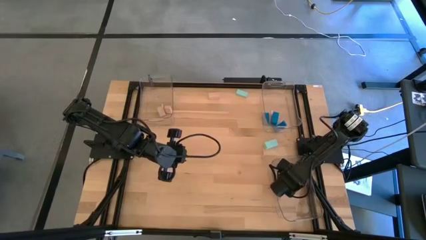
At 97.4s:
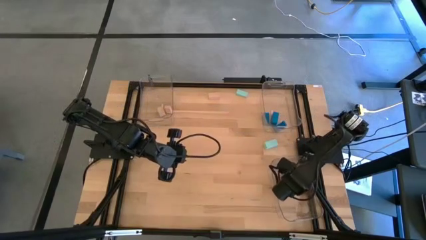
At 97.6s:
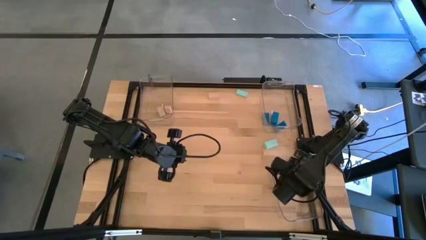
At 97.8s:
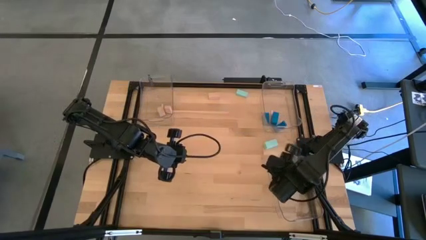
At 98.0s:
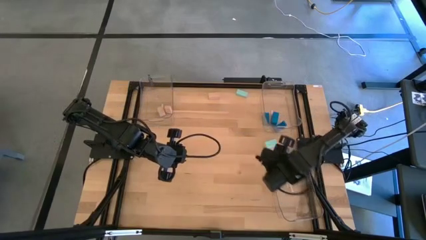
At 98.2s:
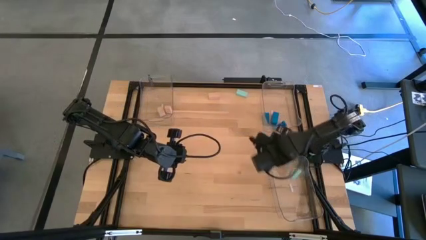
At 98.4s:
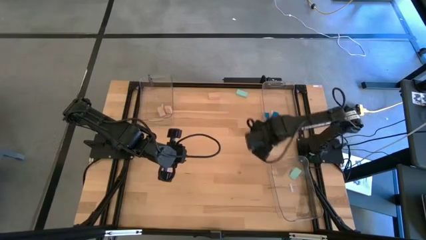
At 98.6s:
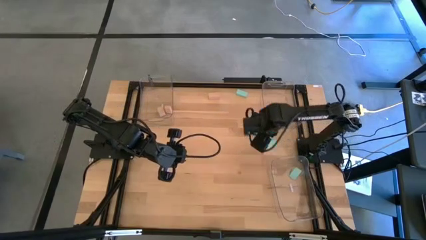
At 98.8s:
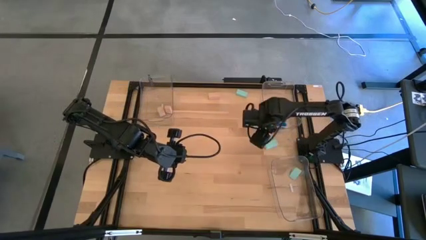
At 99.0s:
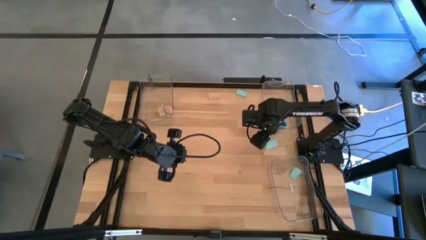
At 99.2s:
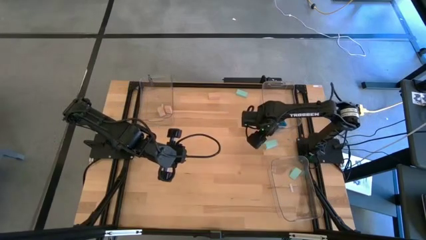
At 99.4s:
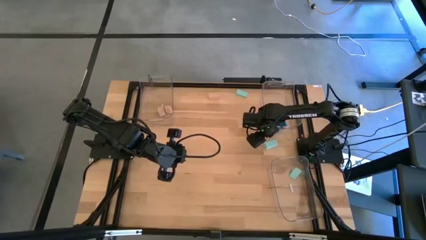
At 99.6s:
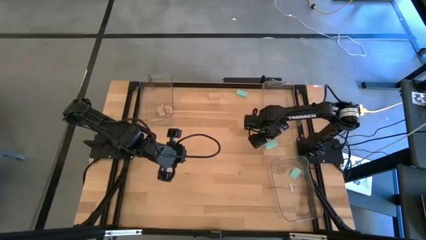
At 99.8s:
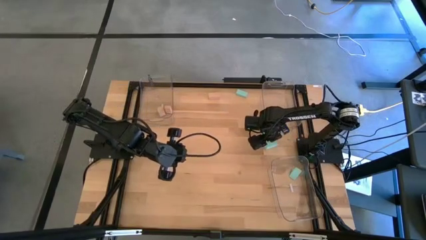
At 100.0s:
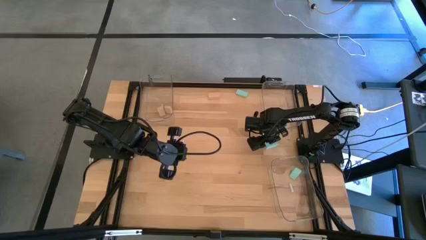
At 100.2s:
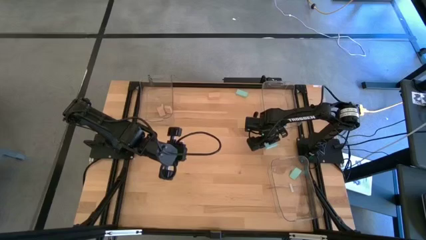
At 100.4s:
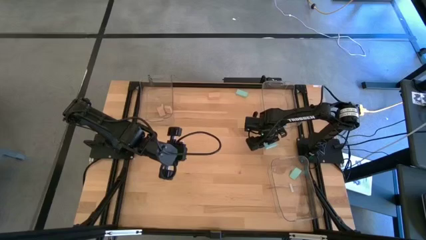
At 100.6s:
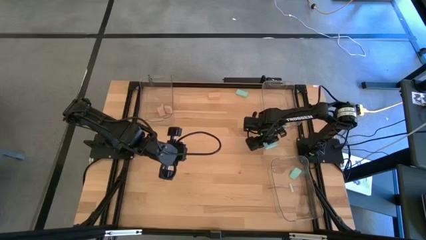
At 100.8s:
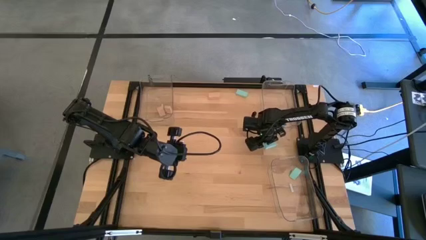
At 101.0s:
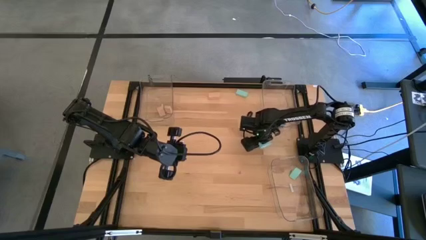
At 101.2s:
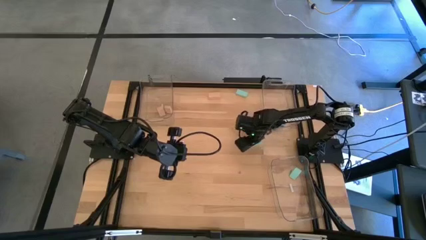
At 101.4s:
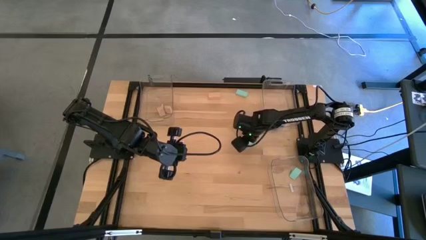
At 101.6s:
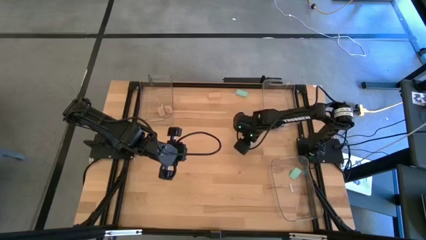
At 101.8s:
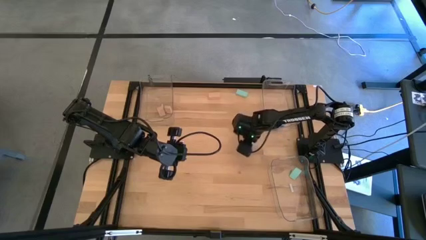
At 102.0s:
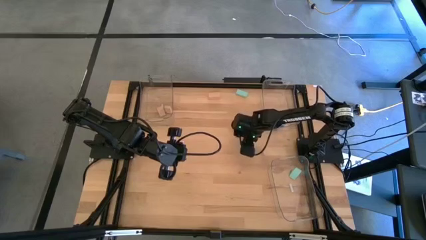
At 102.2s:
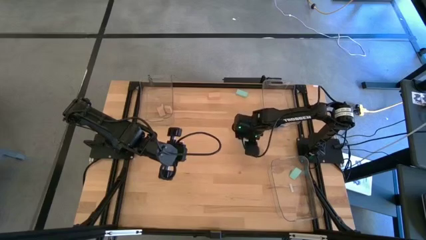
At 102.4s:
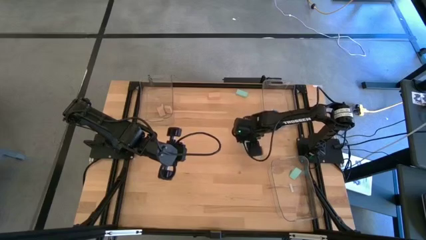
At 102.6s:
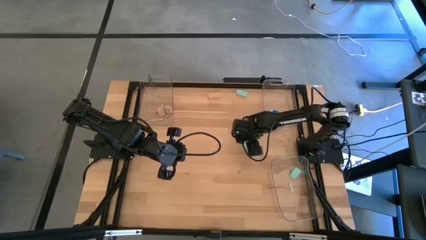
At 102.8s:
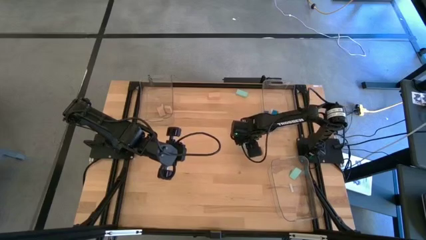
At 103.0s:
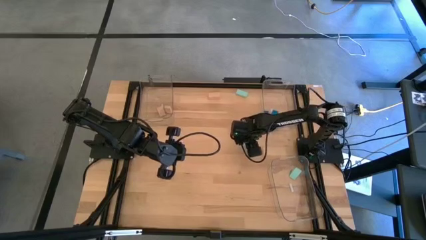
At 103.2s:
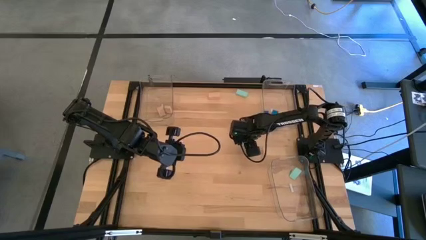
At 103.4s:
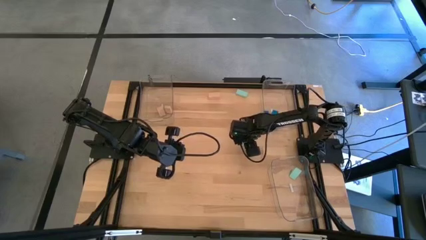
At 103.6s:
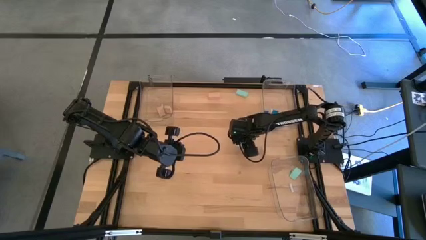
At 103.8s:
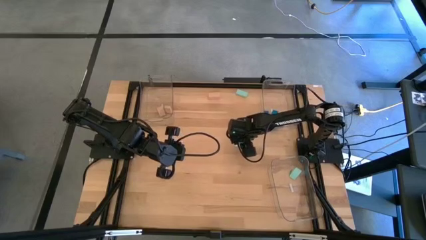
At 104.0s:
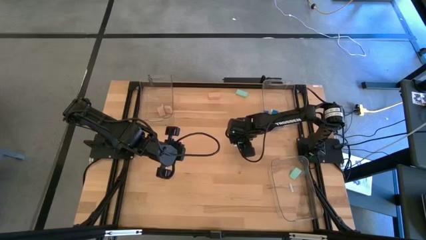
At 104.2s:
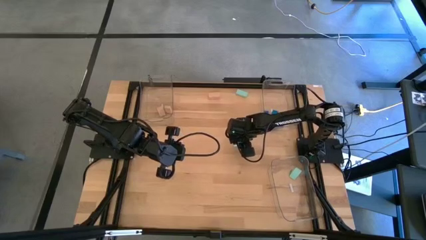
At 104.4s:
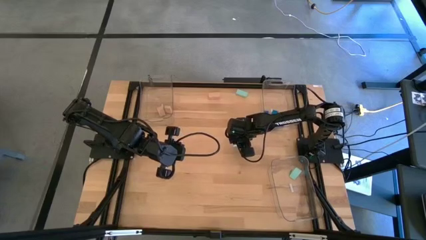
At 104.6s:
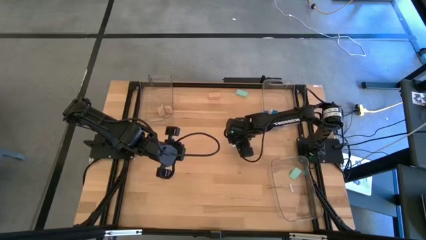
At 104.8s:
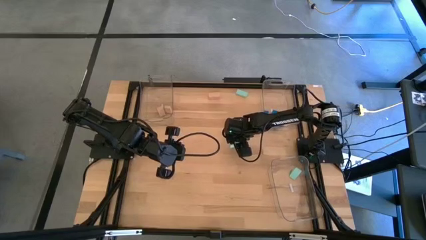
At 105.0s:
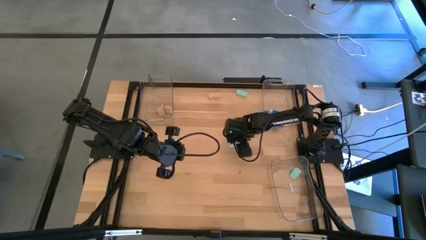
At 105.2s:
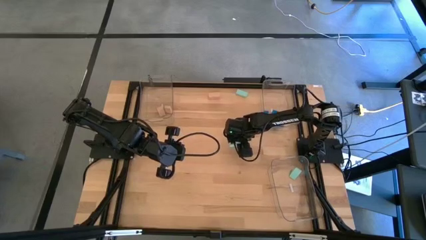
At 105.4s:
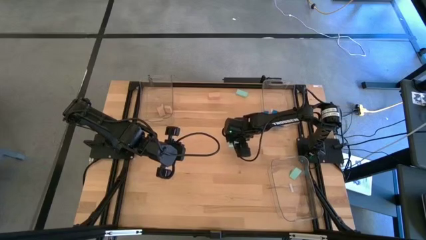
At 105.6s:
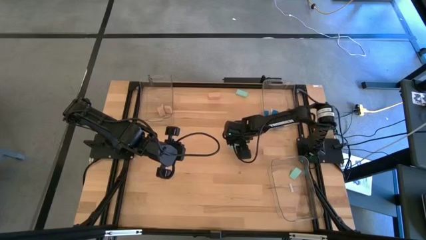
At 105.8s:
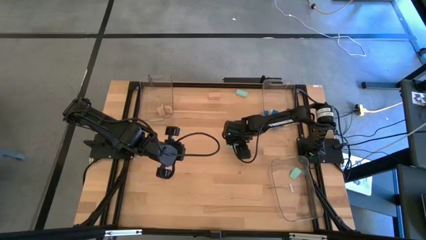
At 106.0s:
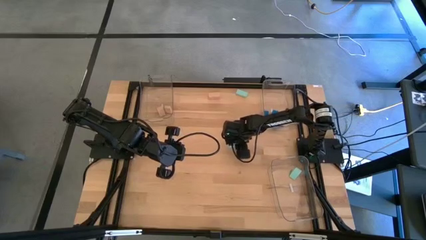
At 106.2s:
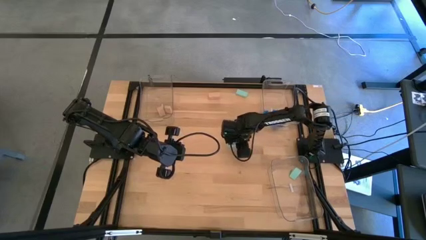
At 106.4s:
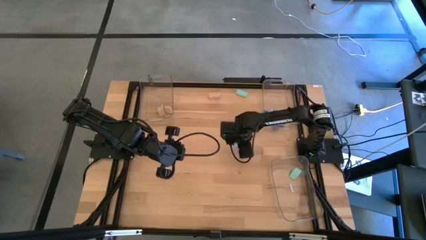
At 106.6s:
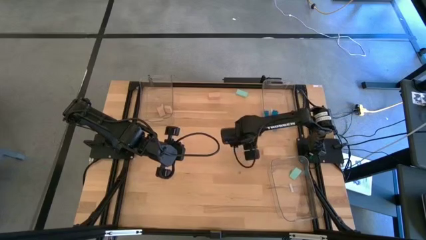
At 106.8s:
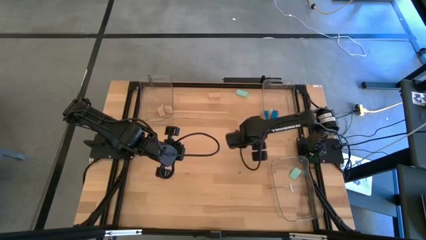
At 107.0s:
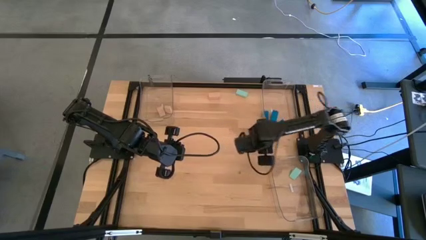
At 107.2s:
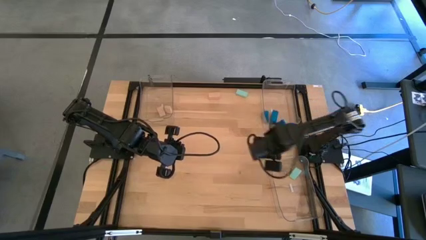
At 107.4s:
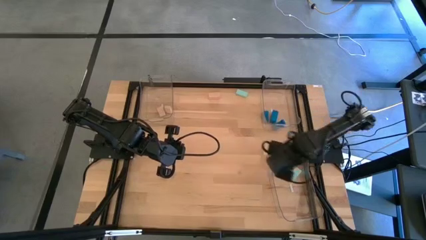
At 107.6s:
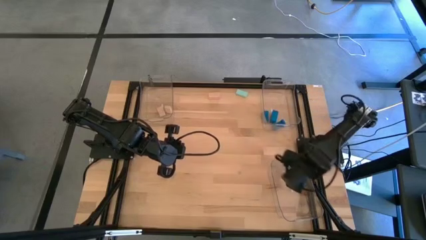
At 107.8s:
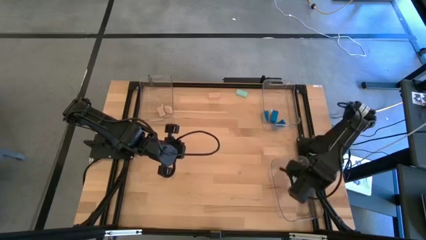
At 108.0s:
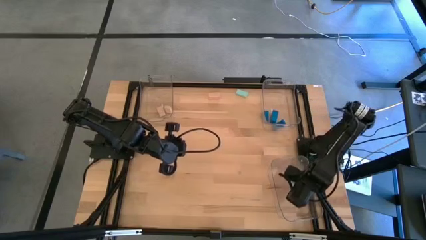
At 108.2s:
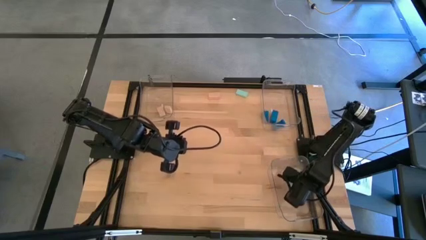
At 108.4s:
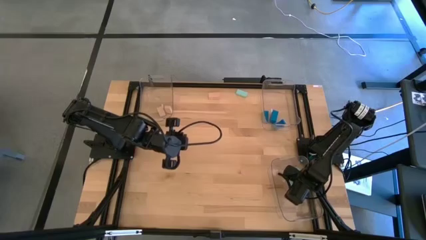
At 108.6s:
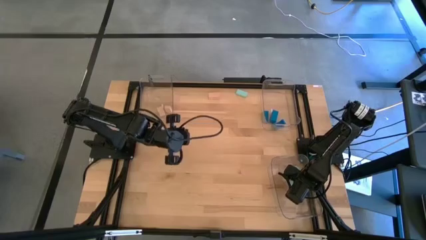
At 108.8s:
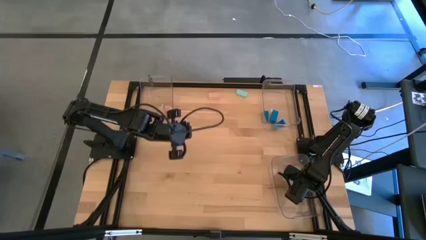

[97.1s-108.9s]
Task: Sort & place blocks by color
Put the bottom light blue block into the bottom right transparent bin

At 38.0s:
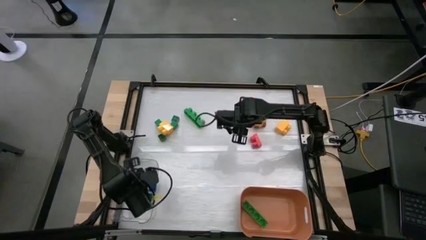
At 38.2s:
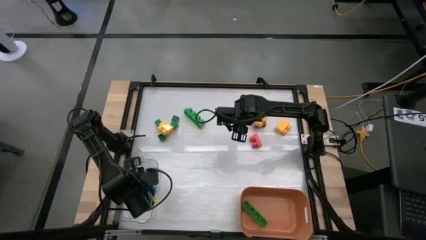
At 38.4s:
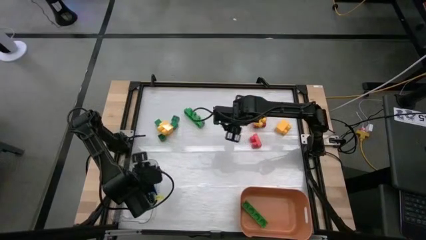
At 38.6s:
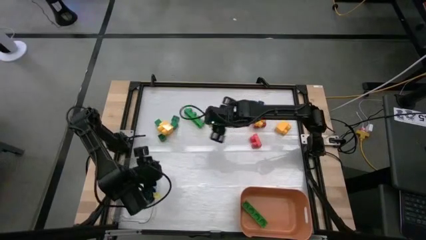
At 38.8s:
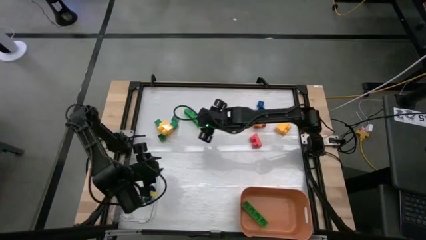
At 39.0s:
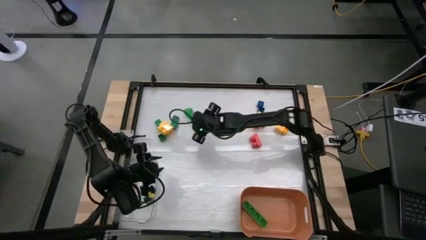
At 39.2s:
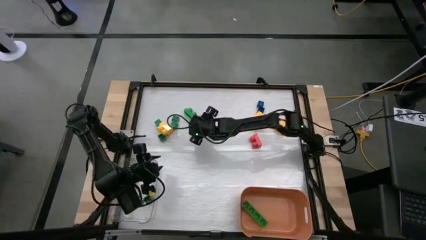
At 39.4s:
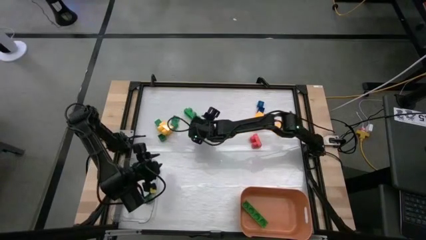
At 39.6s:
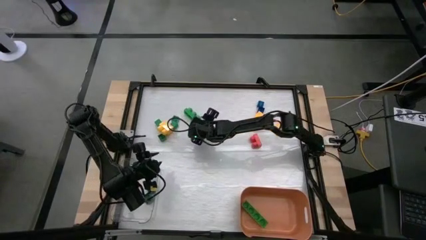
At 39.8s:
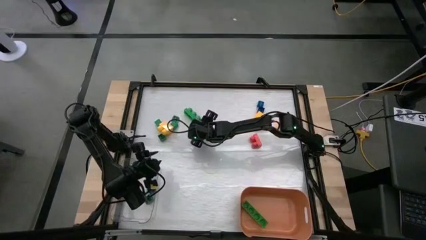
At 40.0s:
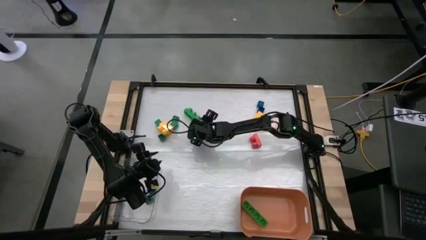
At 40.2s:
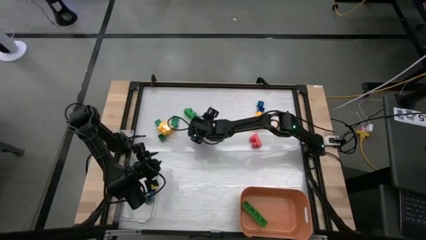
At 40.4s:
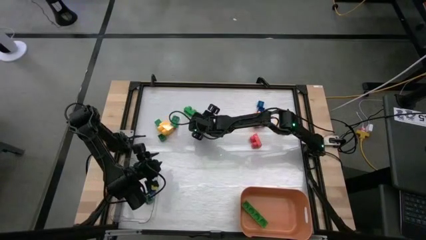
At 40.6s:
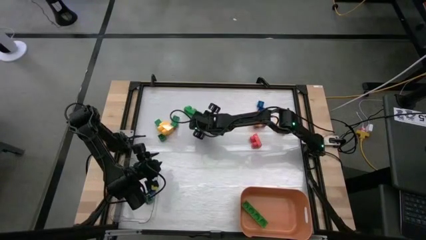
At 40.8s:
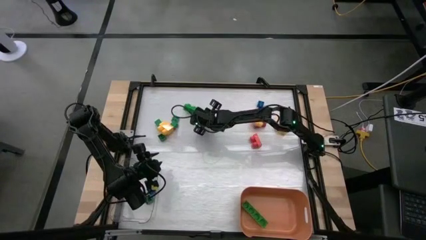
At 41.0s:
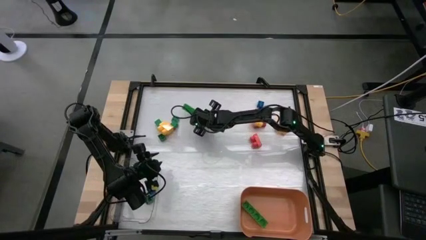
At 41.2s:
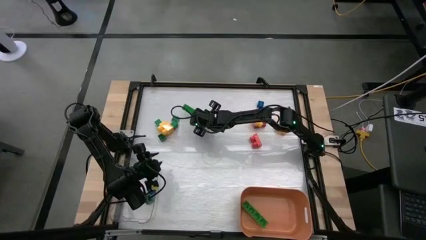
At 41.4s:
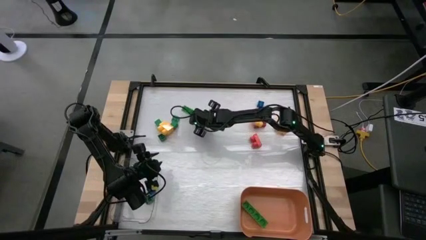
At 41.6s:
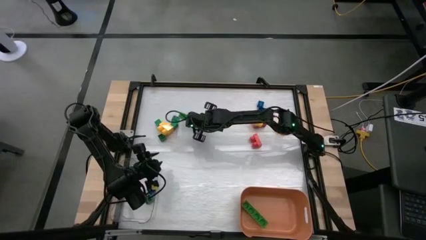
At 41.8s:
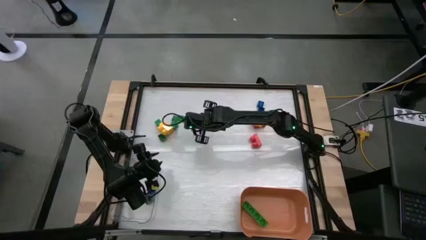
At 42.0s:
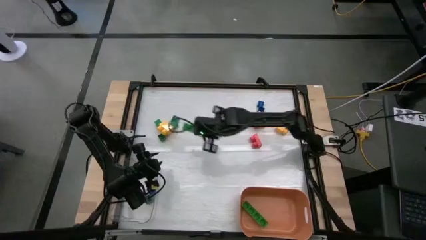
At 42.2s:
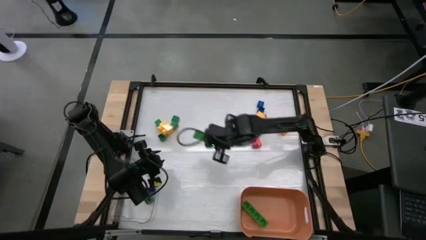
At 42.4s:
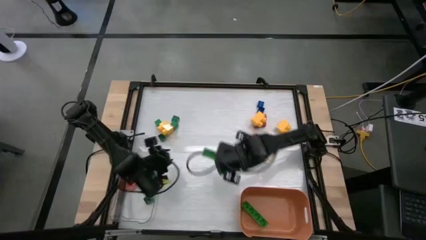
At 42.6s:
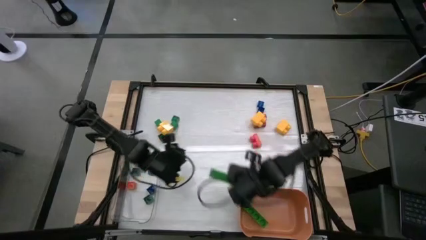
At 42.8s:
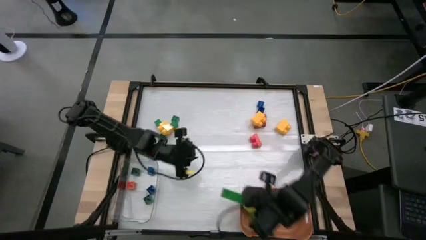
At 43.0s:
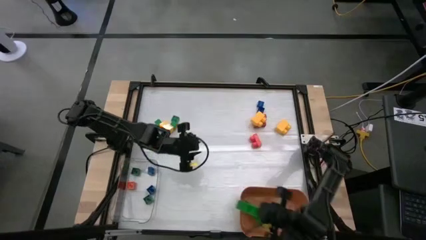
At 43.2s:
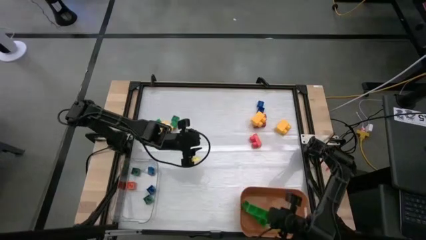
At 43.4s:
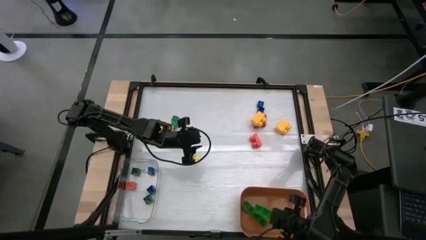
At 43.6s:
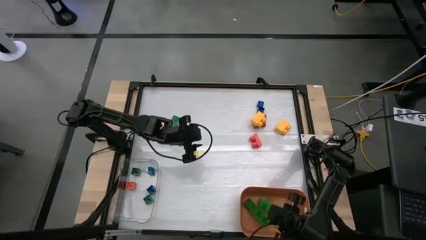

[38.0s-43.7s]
Task: Sort blocks by size
Put the big green game piece into the orange bin
